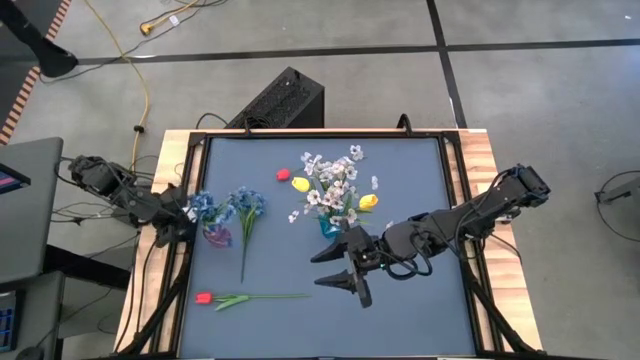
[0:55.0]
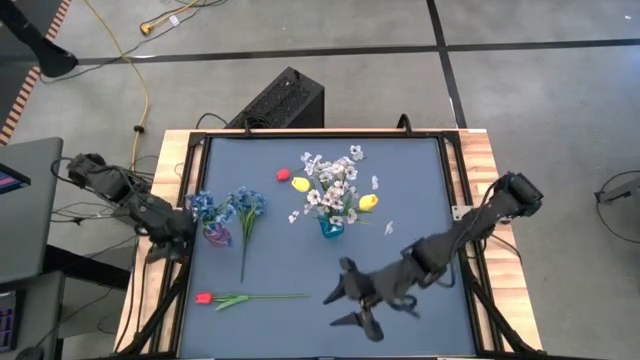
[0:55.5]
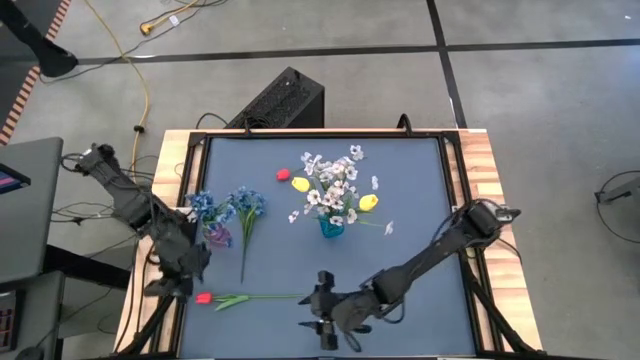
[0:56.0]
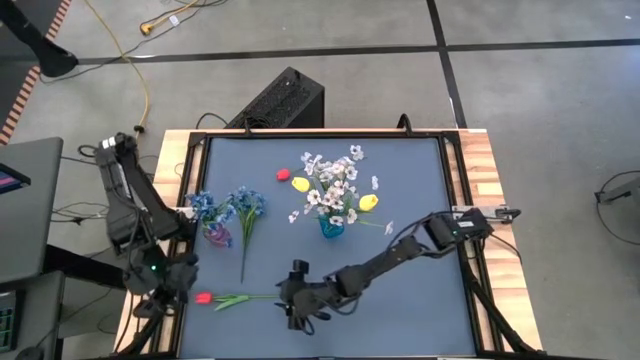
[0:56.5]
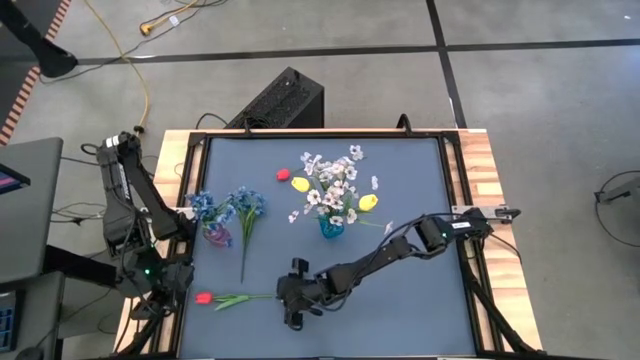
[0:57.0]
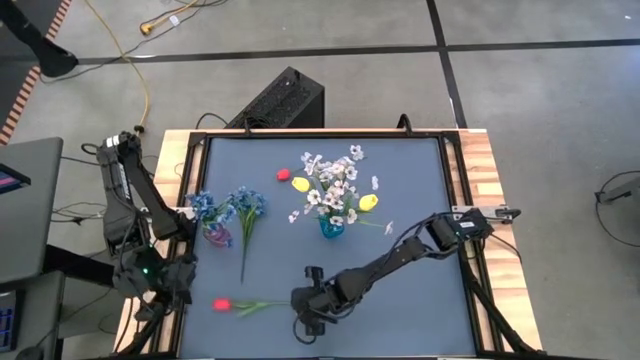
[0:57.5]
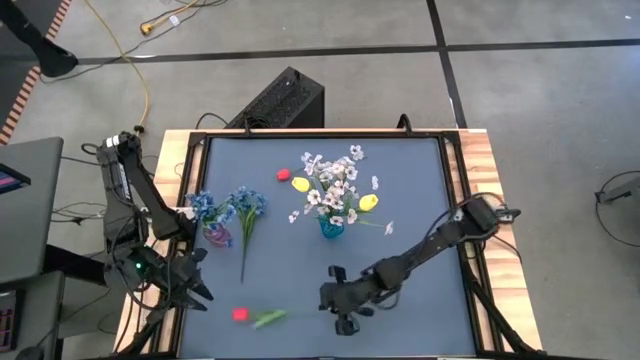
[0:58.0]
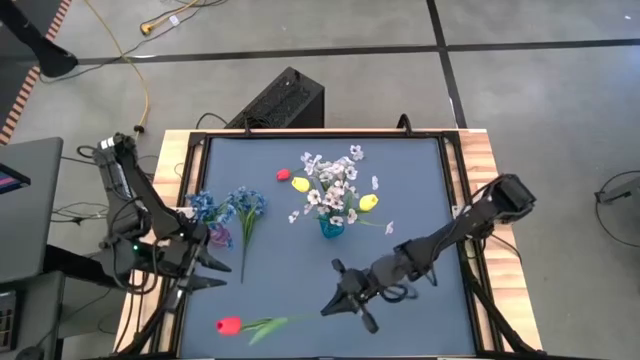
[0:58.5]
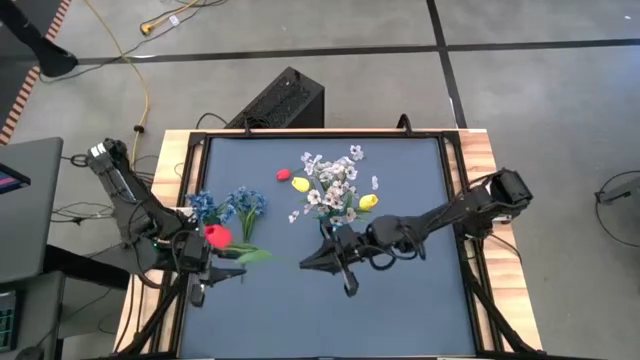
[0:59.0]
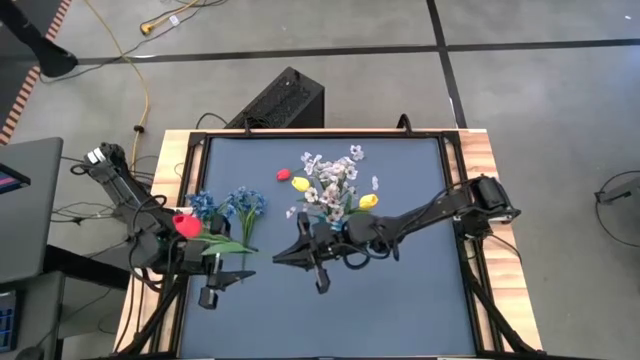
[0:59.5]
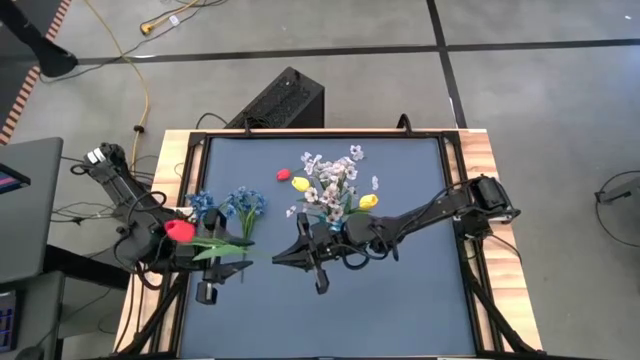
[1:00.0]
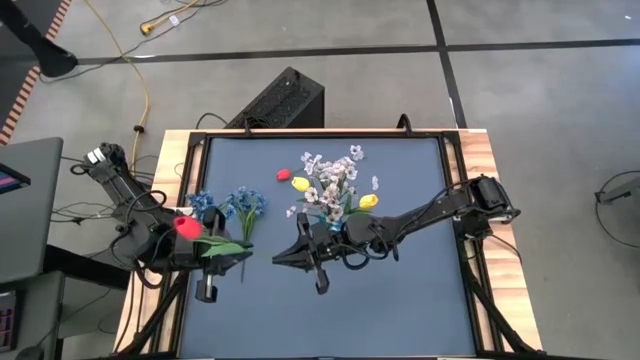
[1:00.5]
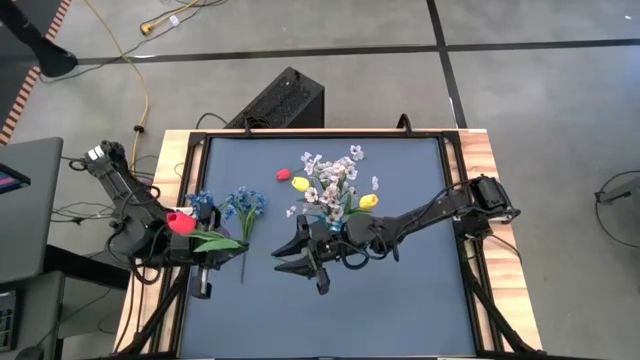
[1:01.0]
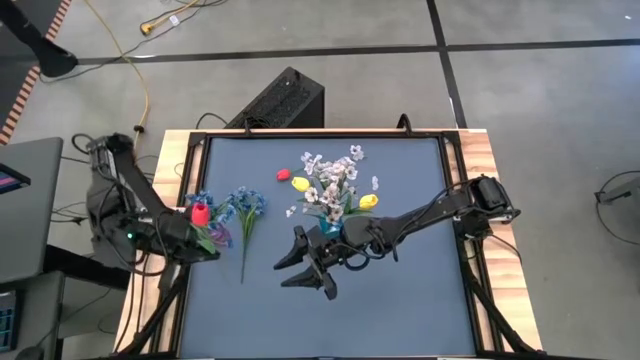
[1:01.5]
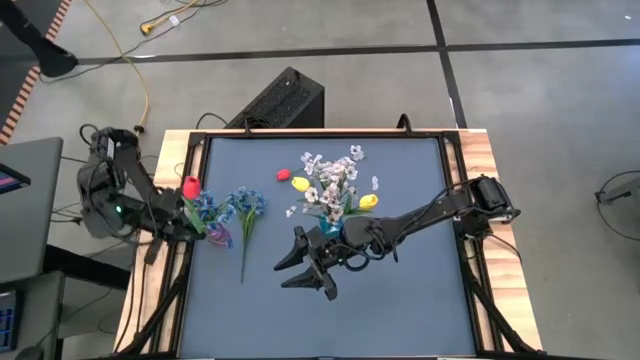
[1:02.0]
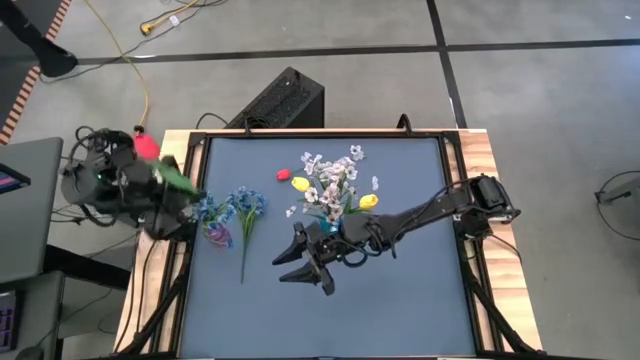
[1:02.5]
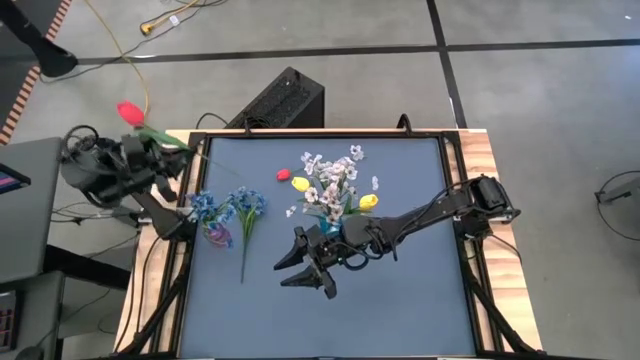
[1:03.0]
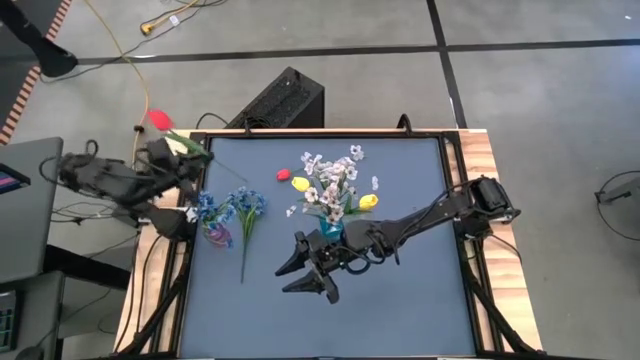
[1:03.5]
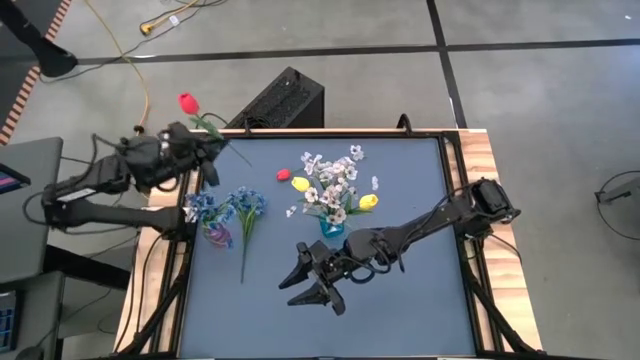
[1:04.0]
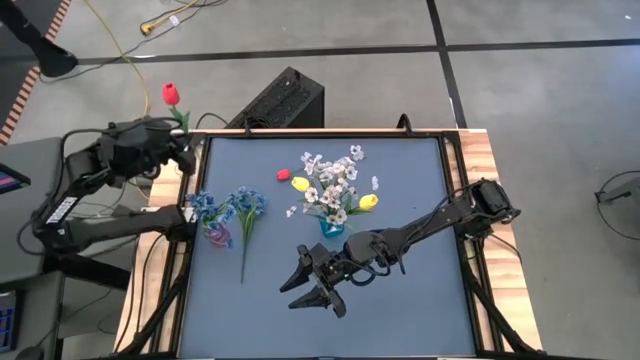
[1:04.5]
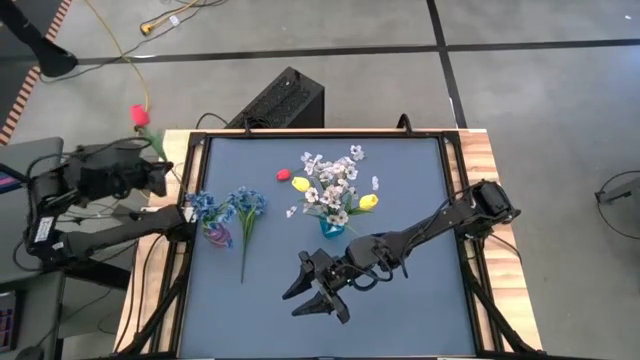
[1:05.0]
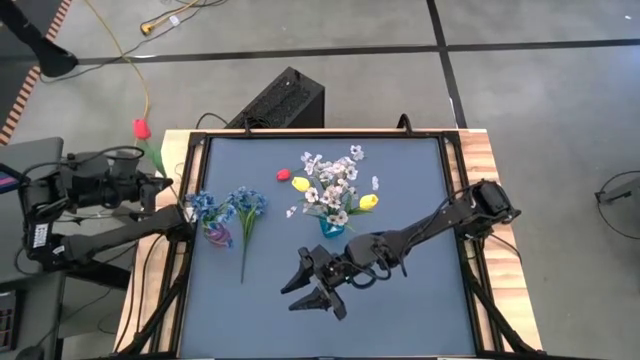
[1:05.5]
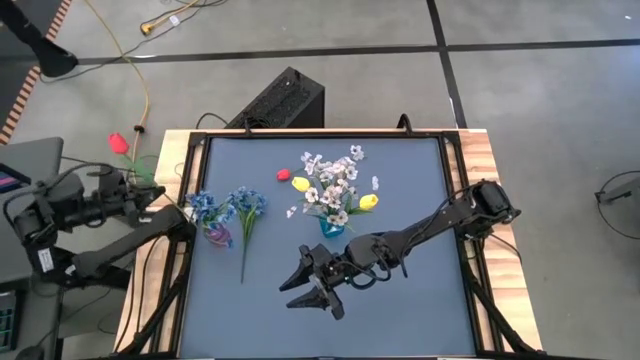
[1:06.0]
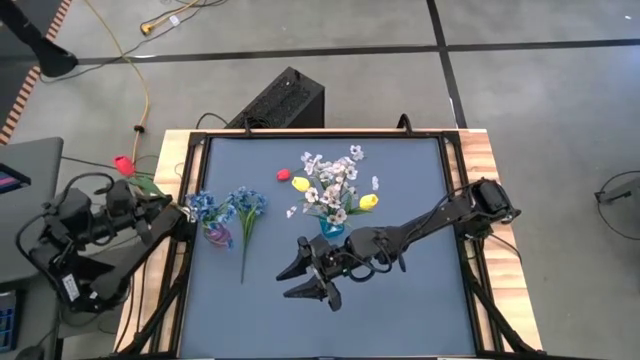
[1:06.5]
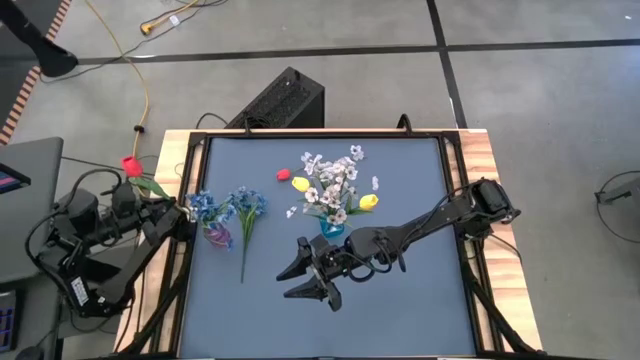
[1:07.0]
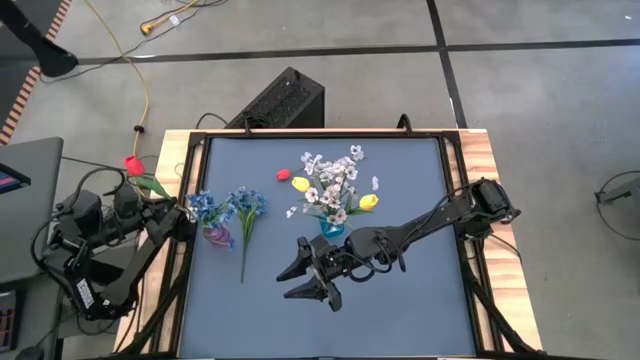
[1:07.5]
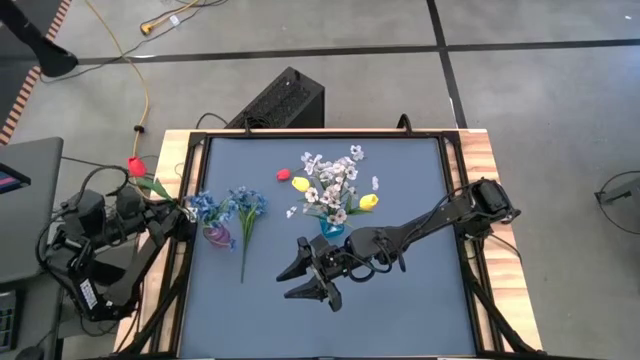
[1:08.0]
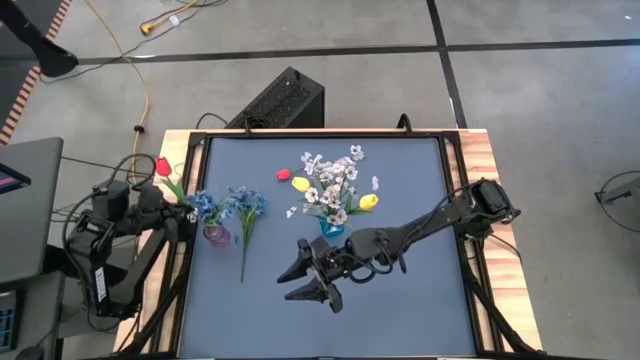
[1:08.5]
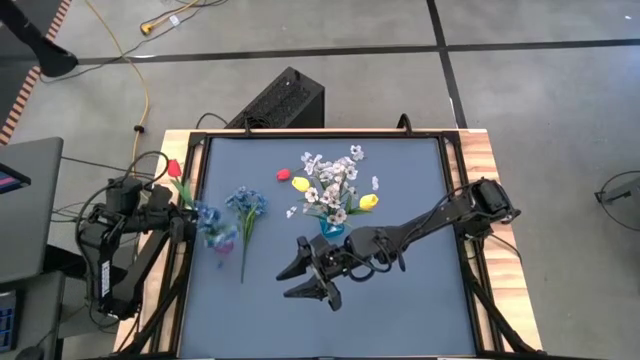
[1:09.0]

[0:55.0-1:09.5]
Task: Sort flowers into vase by color
Put the bottom red tulip into the purple vase

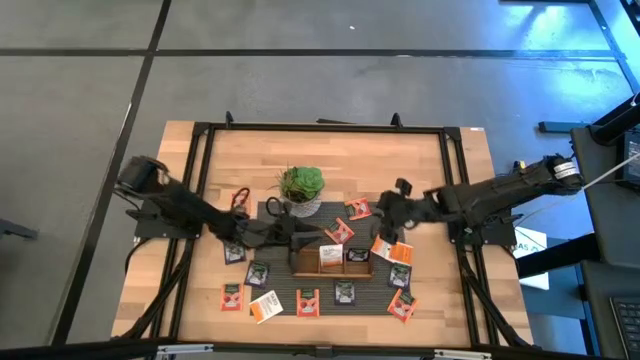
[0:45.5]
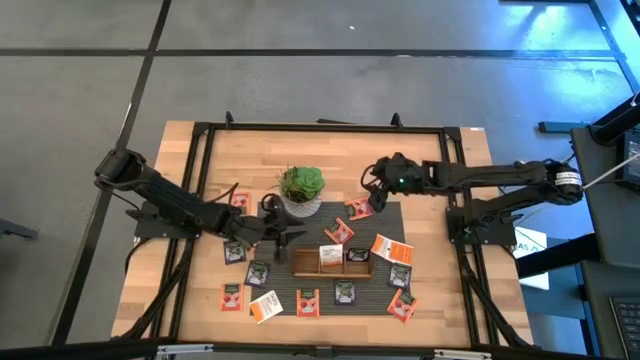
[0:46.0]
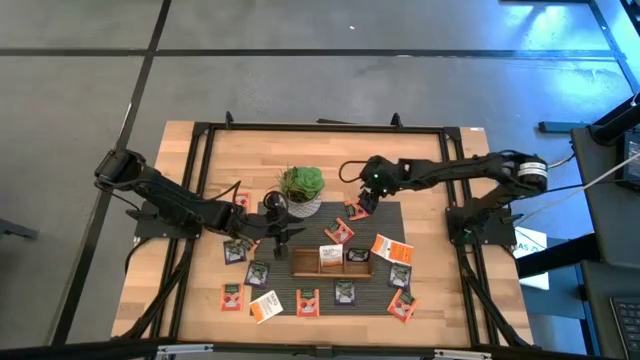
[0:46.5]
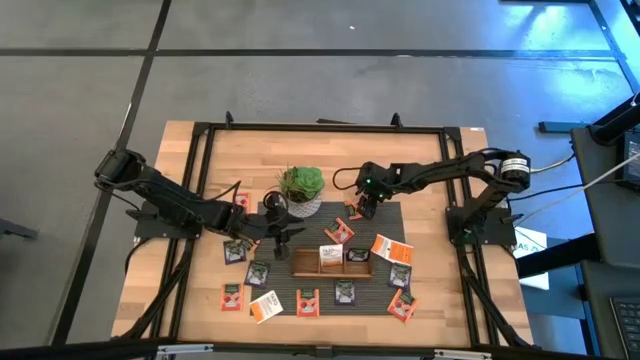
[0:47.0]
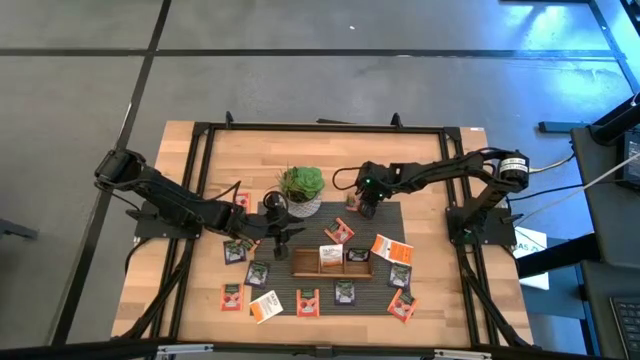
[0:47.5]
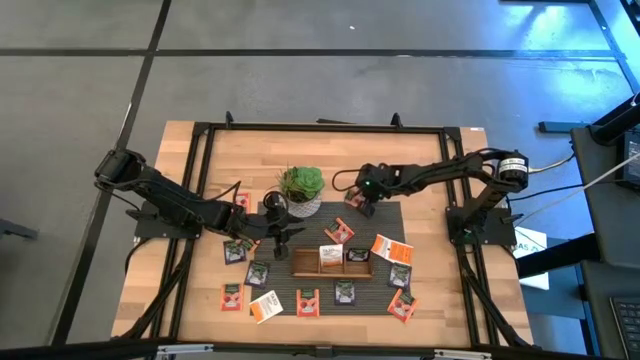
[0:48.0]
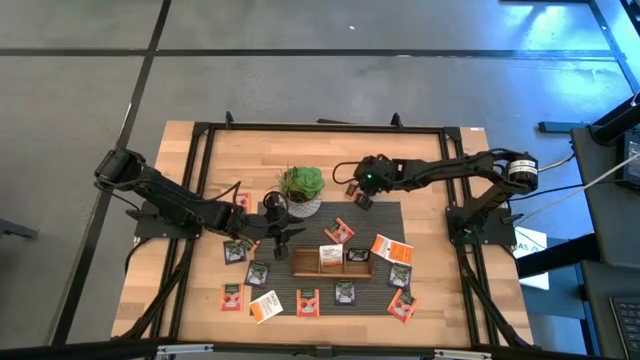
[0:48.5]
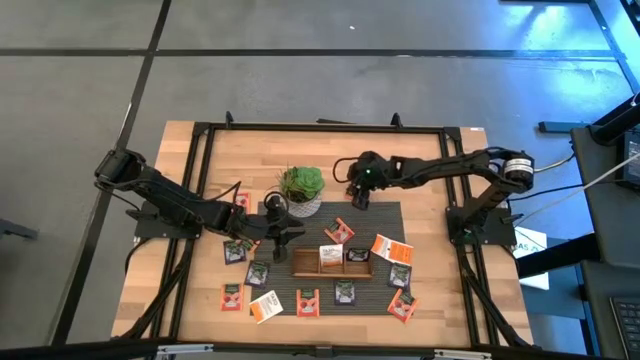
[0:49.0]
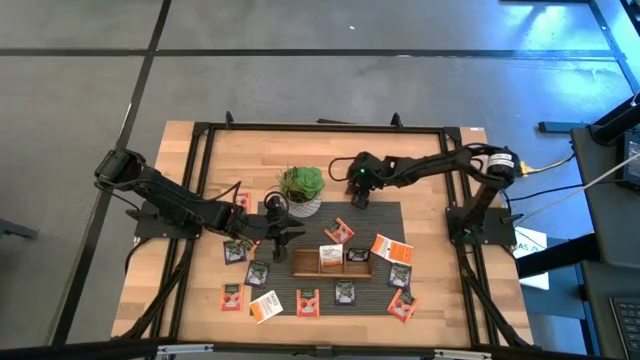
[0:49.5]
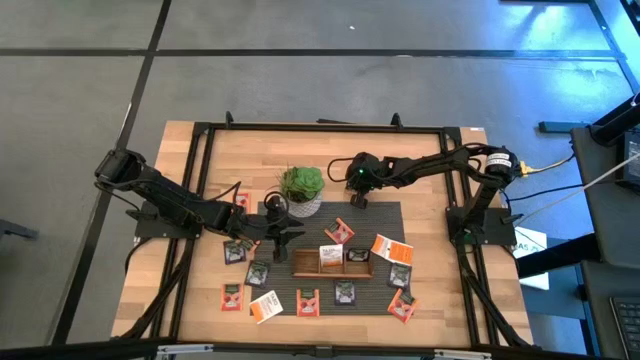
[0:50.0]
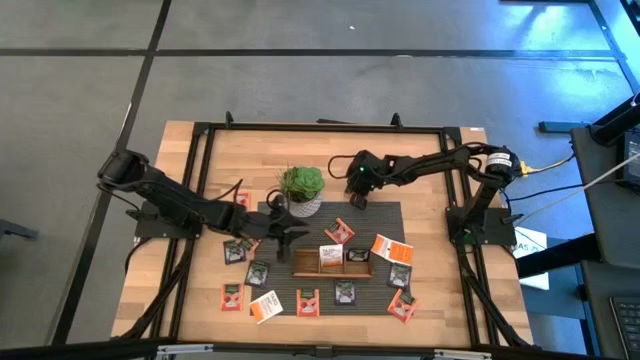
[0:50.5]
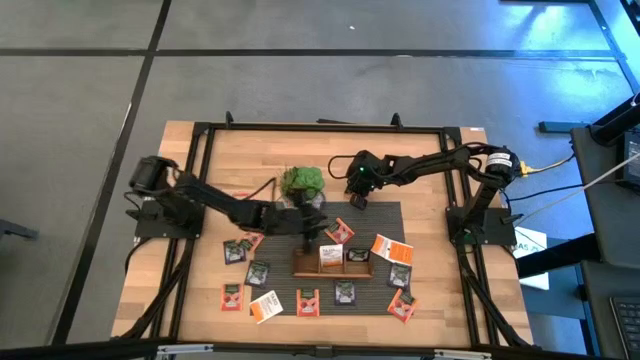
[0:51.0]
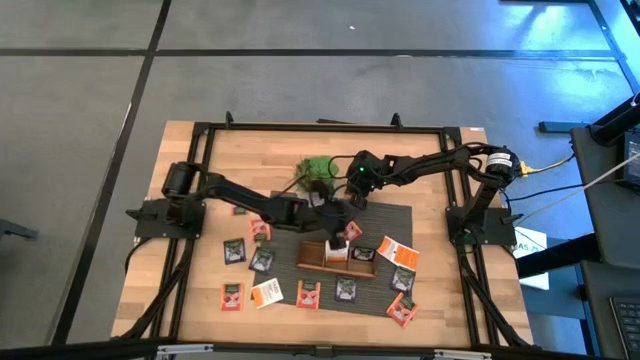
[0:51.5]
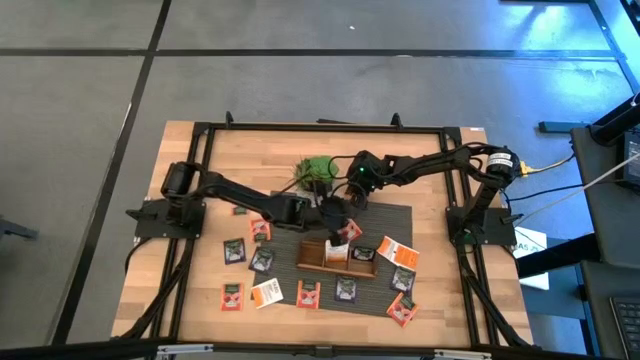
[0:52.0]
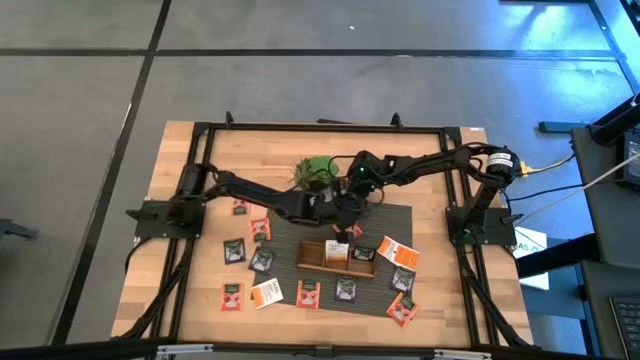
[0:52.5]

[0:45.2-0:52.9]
Task: Pick & Place Tea
Put the orange tea bag into the left section of the wooden organizer
